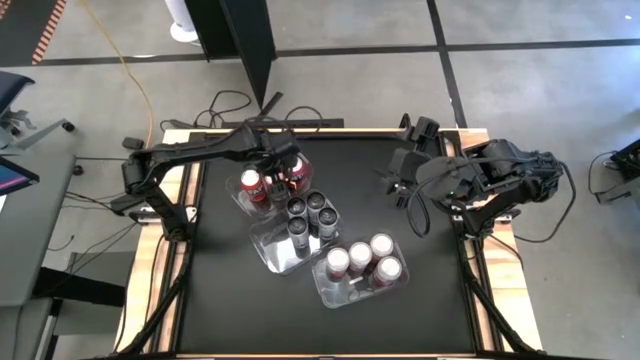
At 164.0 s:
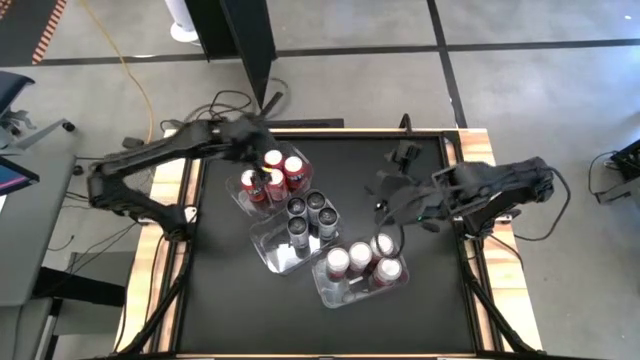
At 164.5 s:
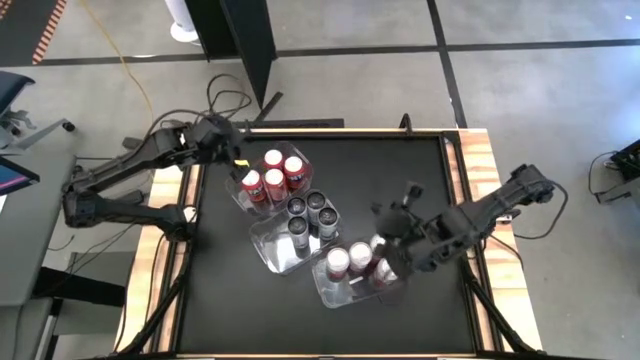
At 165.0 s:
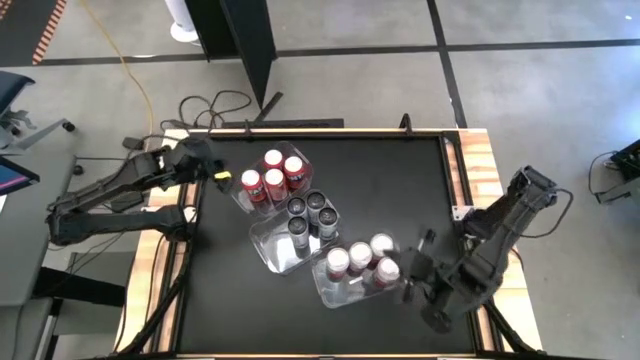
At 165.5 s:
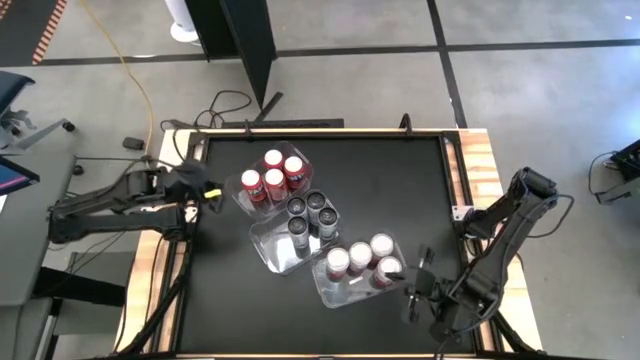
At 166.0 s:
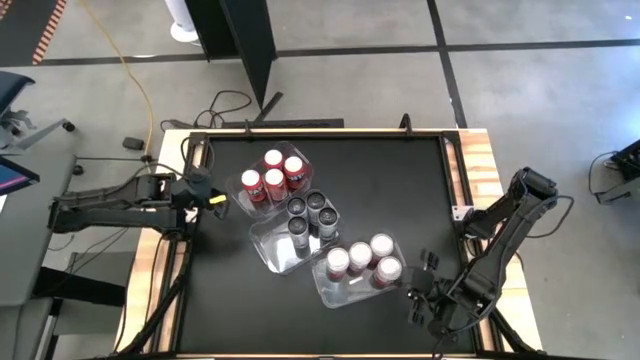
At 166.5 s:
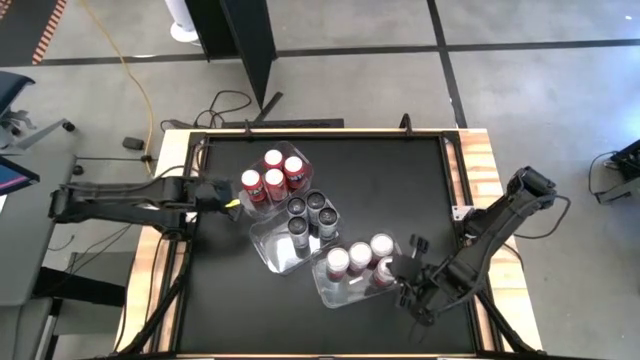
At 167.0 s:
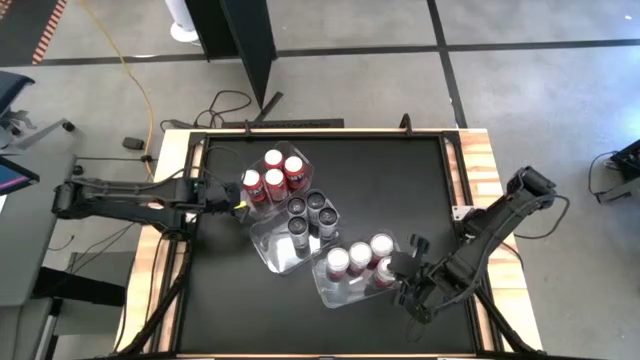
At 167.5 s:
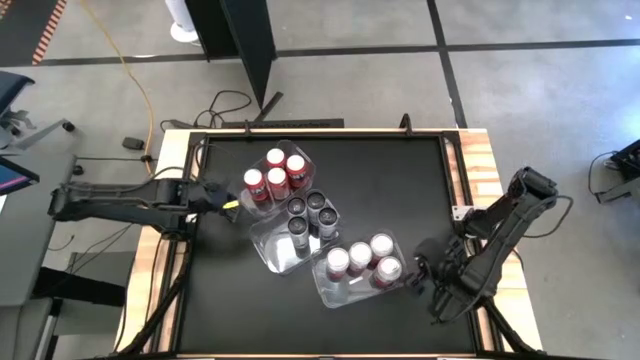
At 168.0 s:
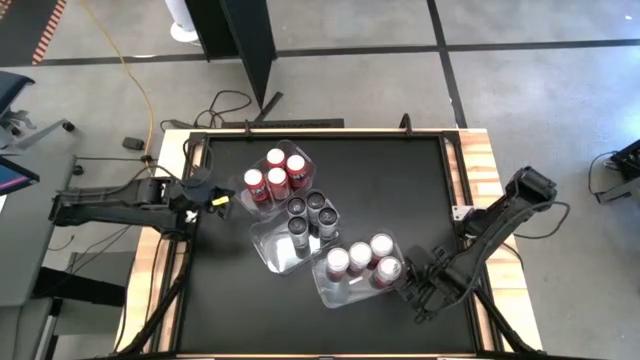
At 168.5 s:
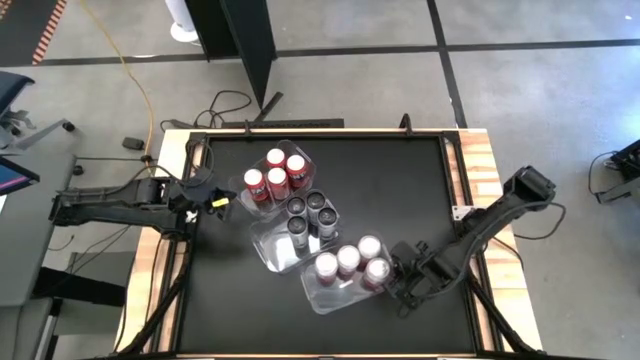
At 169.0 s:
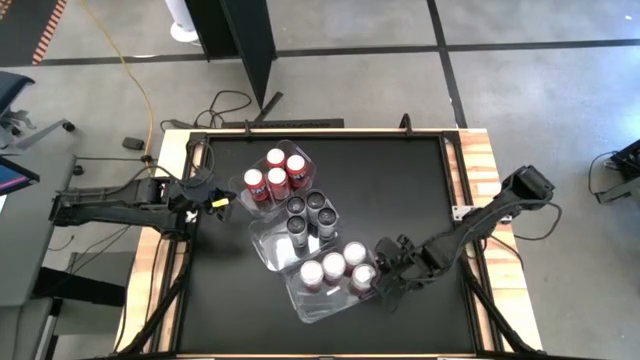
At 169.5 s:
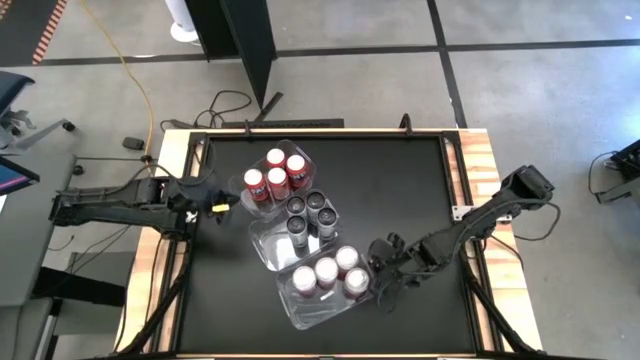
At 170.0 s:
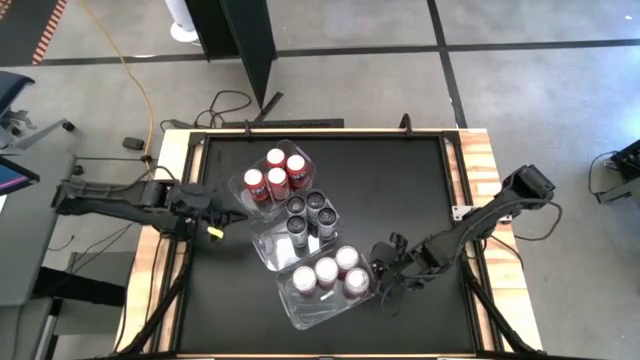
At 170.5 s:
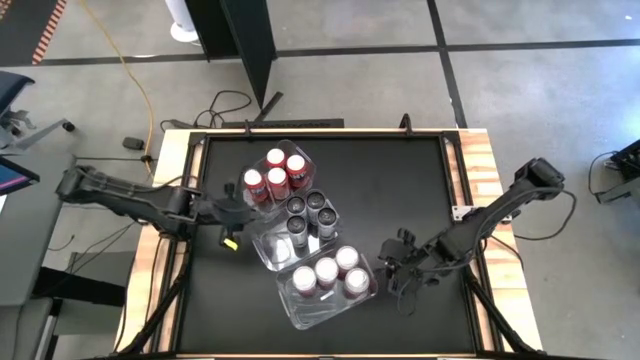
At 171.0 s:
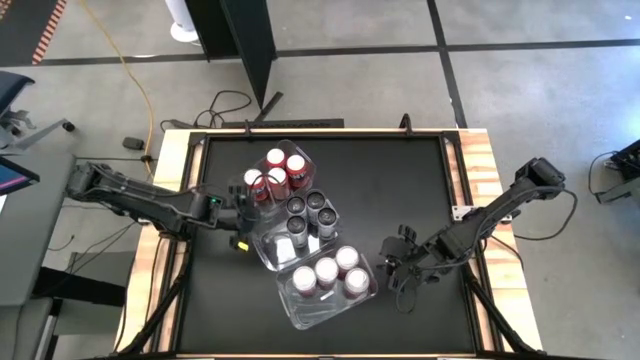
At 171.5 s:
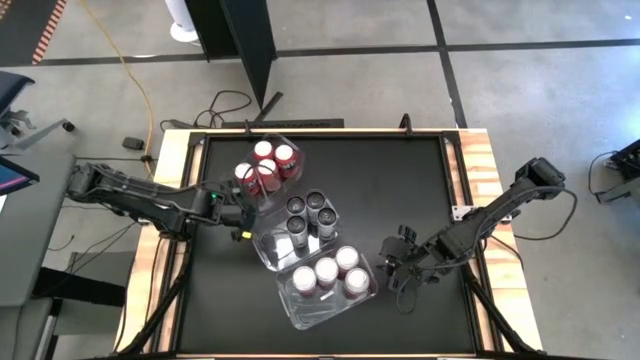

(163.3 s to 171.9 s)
Task: Sort soda cans
Adjust the transparent bins

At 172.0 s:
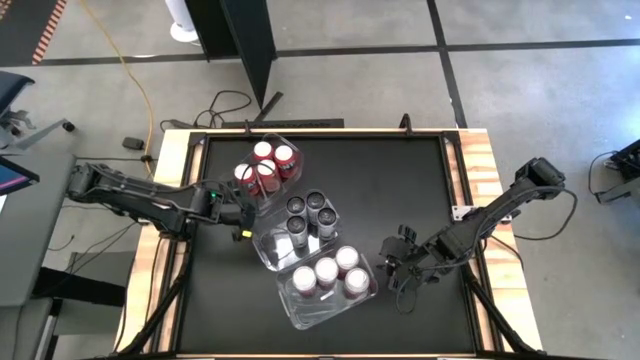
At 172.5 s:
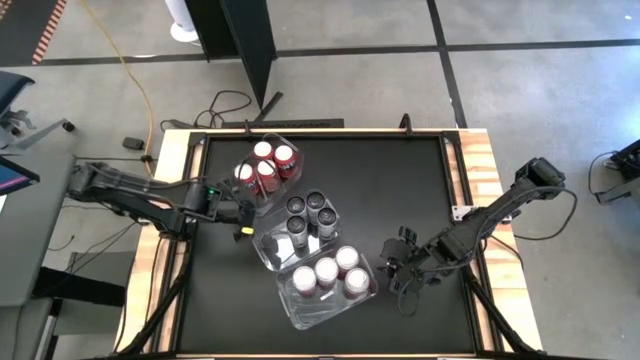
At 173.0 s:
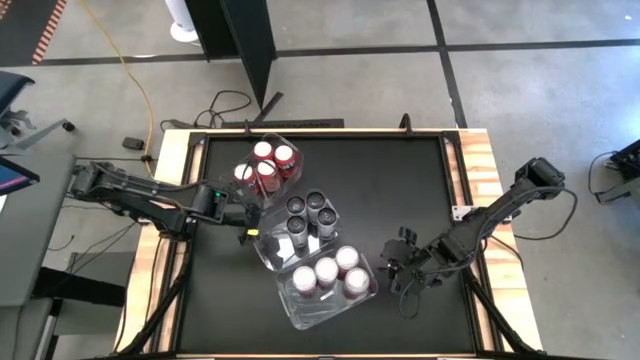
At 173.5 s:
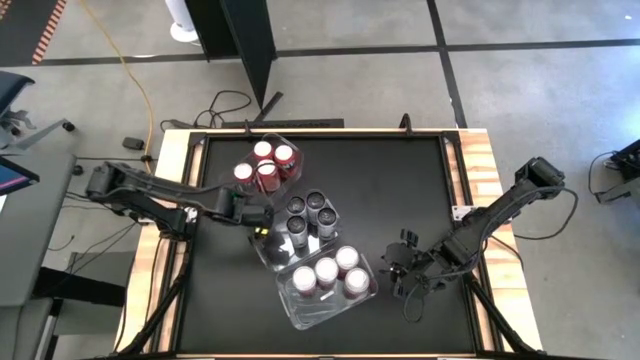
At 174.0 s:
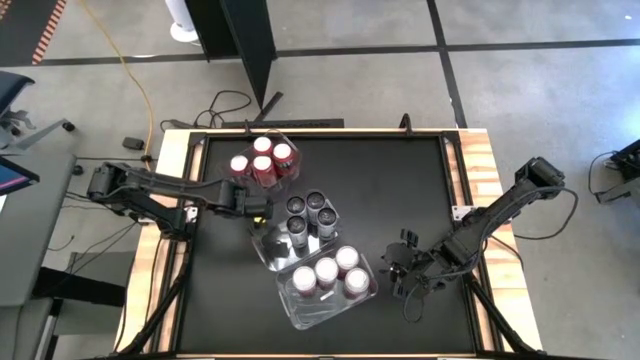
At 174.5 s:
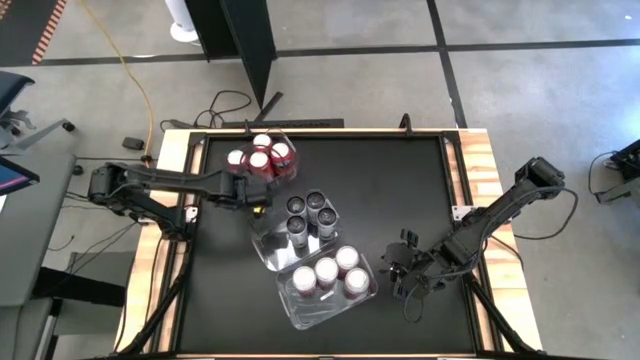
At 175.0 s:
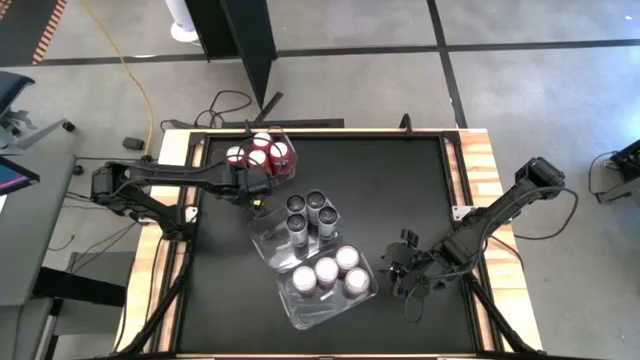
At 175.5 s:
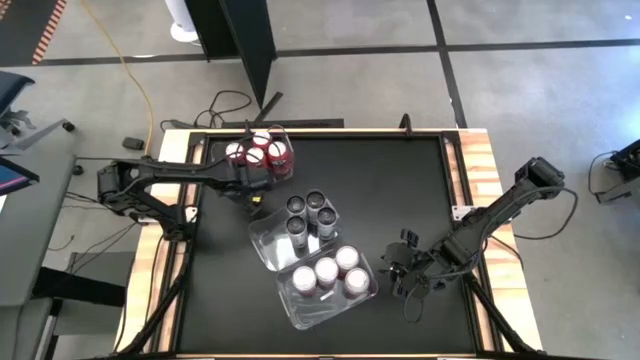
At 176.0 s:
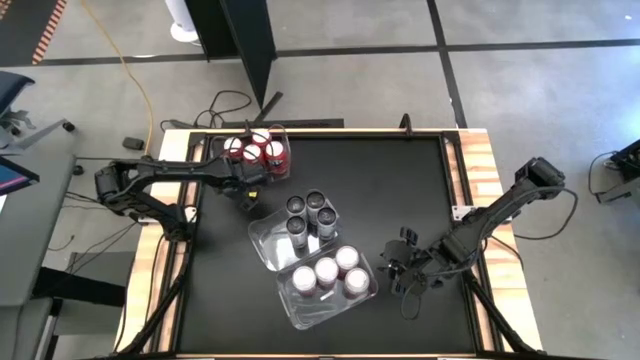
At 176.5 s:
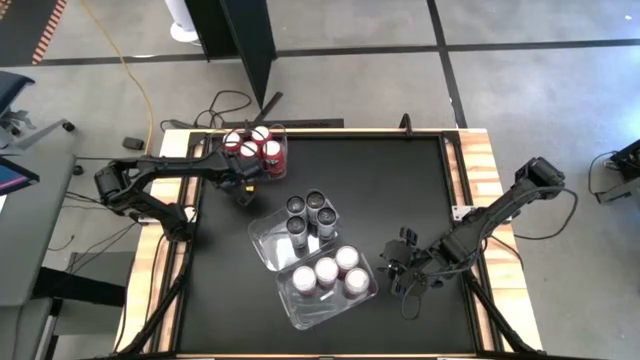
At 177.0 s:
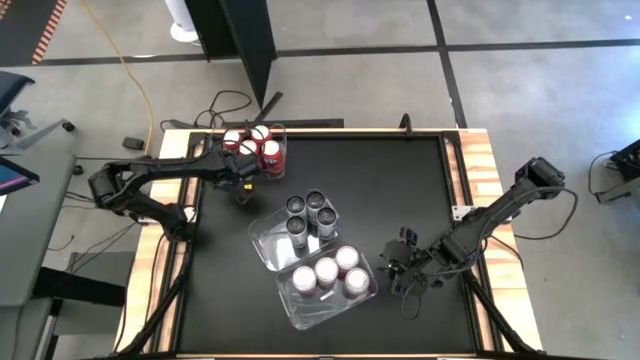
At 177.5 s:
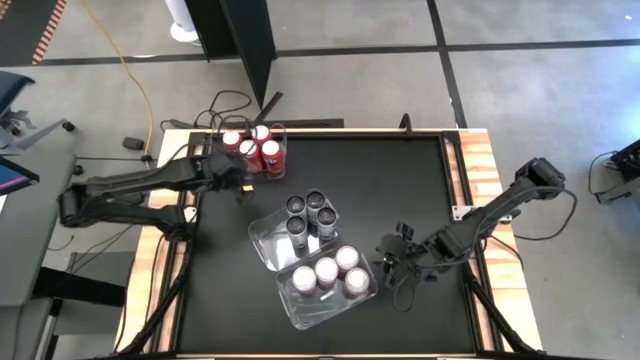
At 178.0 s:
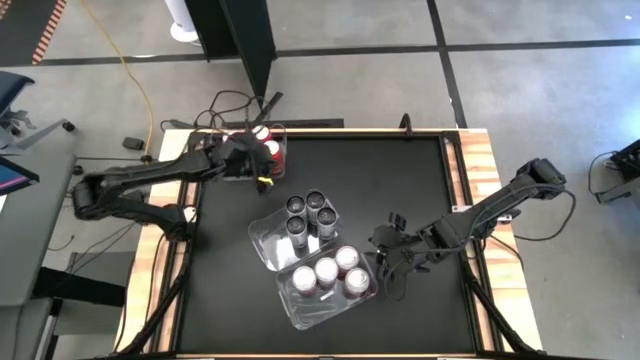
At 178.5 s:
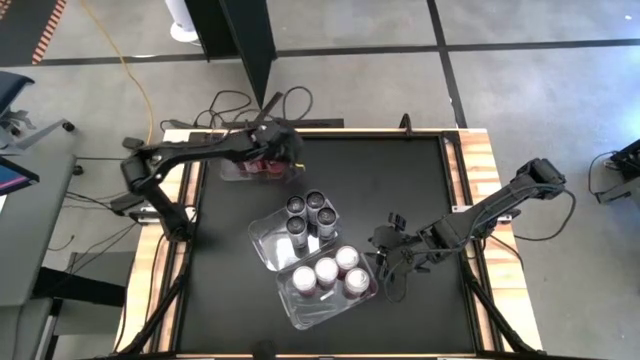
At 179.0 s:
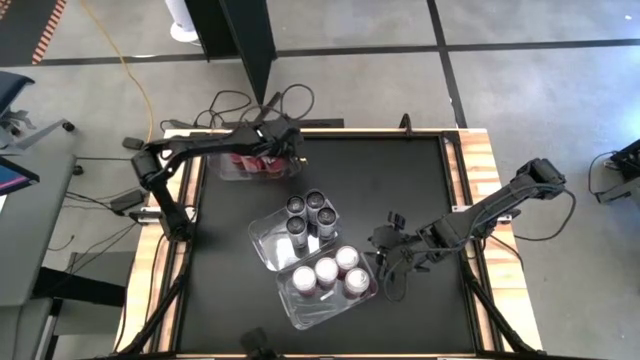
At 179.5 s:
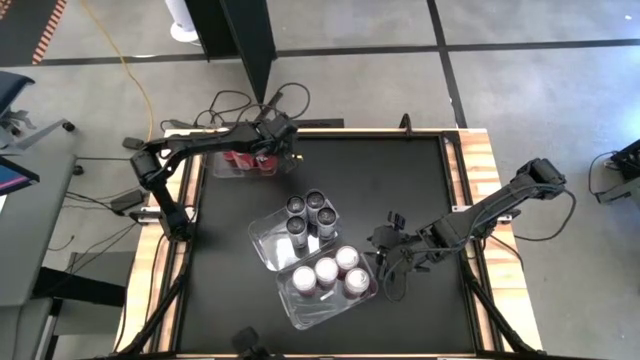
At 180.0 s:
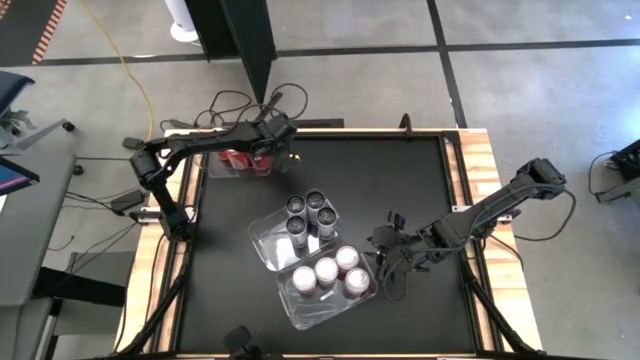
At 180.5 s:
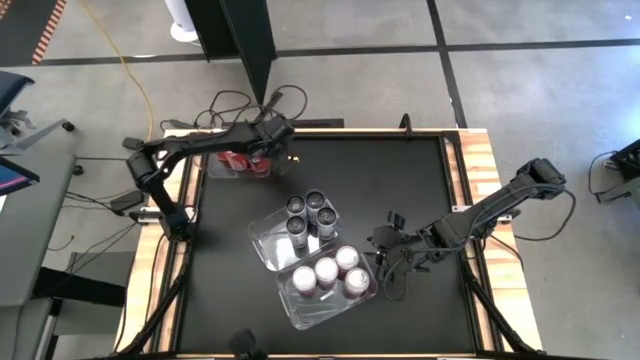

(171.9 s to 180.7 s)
Move the top transparent bin to the top left of the table

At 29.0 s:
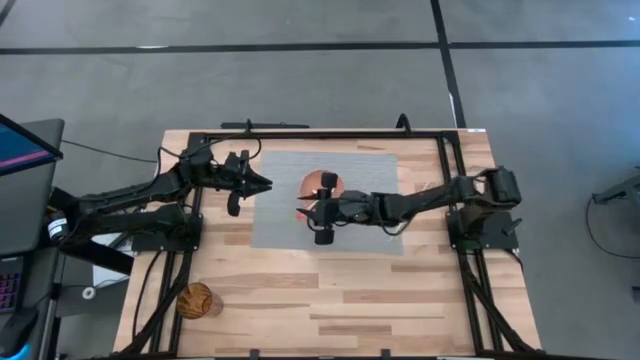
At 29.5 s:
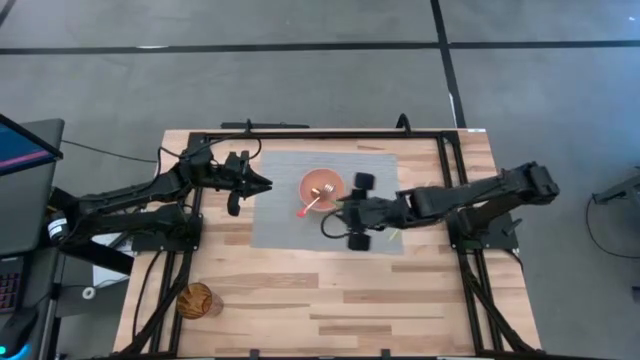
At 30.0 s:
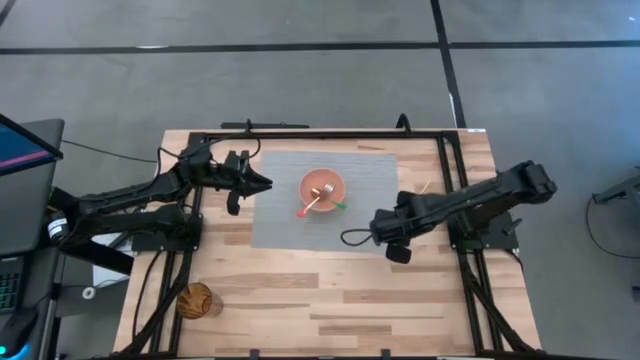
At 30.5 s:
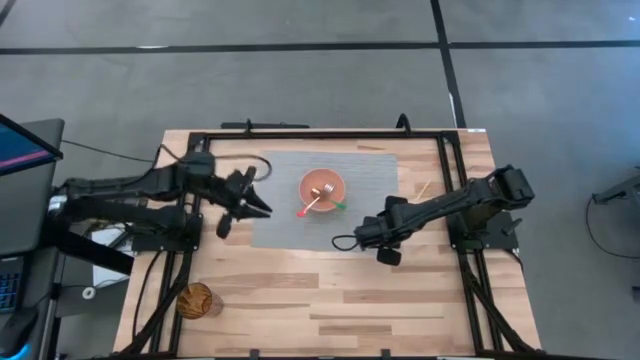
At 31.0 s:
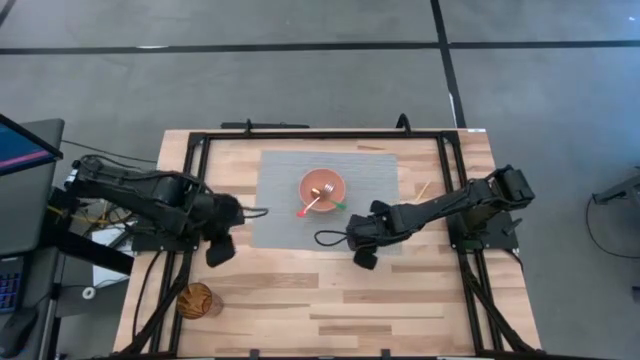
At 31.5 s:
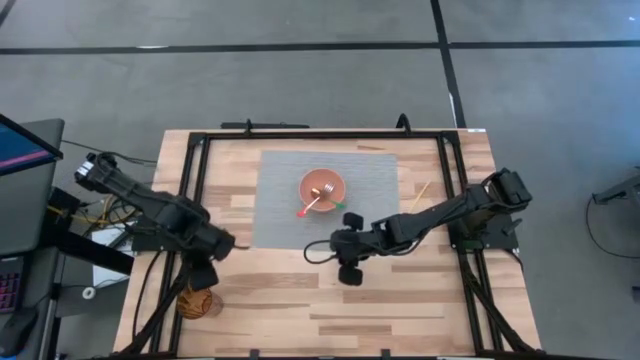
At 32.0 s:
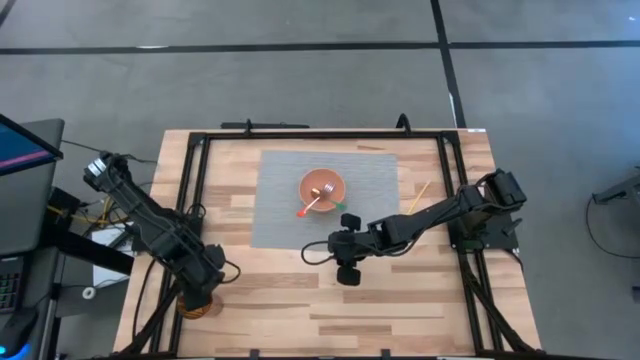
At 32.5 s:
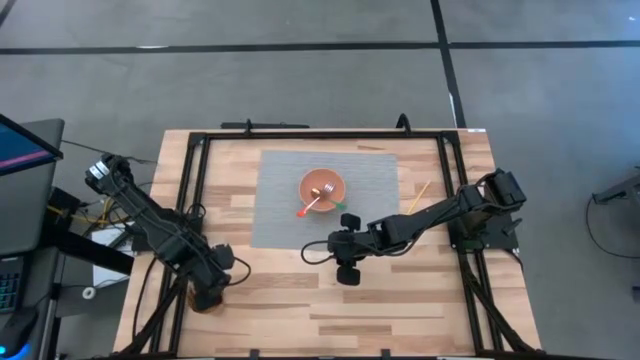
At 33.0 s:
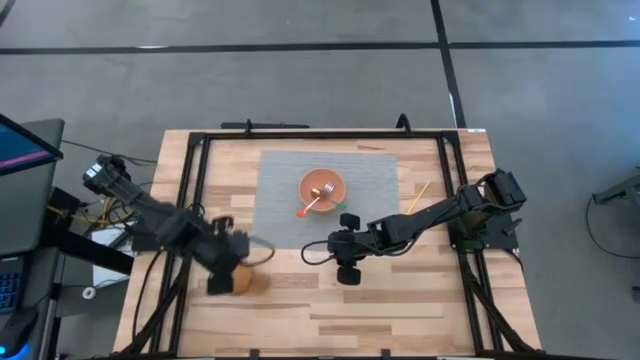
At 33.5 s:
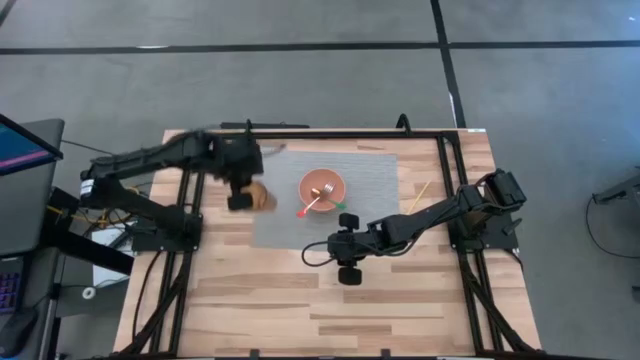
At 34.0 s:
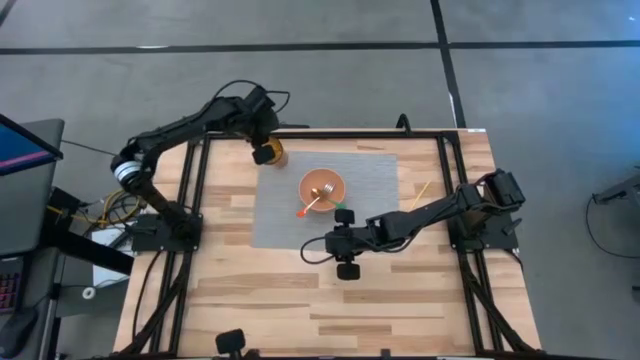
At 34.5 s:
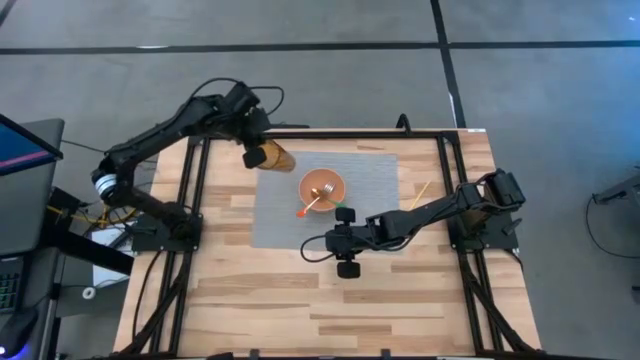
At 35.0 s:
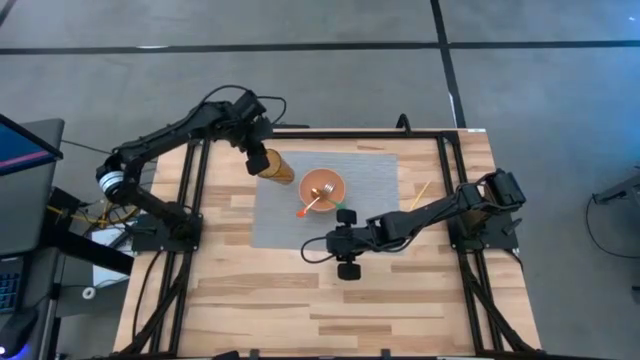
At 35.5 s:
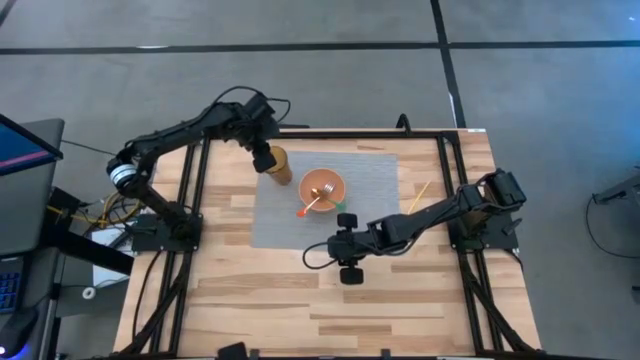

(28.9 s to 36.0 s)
Task: Pick & Place Utensil
Put the brown cup on the top left of the orange bowl on the gray mat
